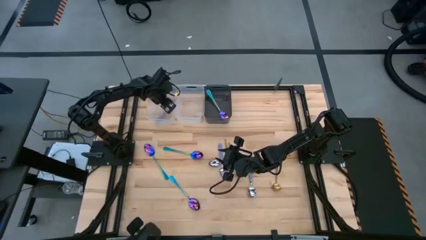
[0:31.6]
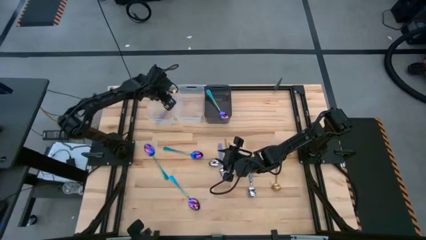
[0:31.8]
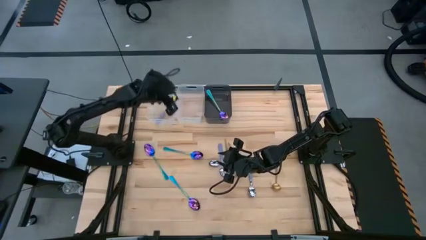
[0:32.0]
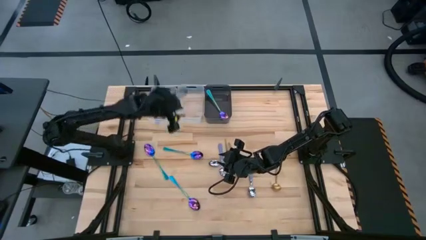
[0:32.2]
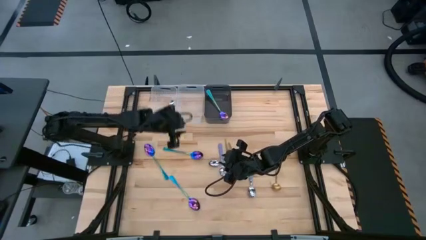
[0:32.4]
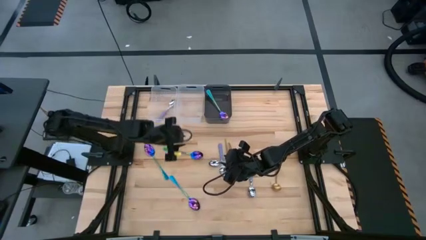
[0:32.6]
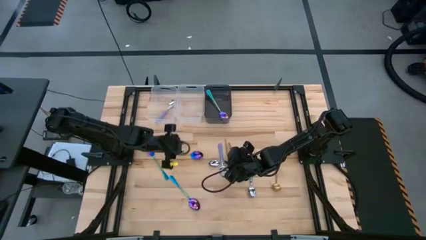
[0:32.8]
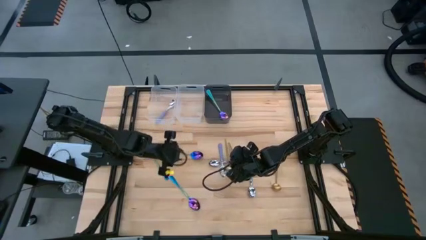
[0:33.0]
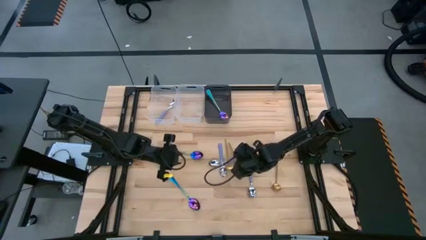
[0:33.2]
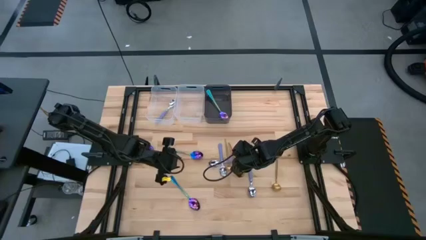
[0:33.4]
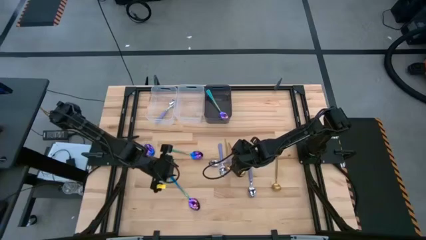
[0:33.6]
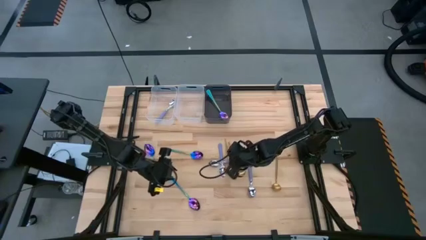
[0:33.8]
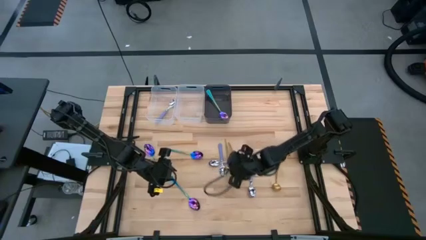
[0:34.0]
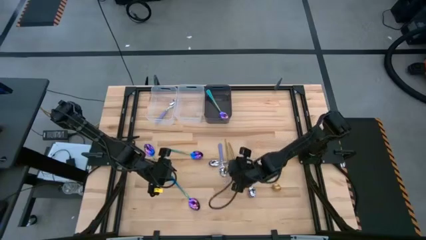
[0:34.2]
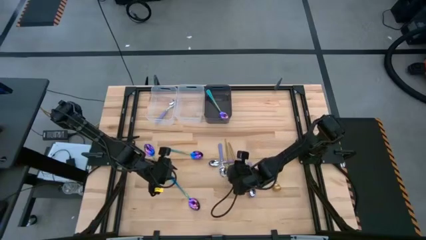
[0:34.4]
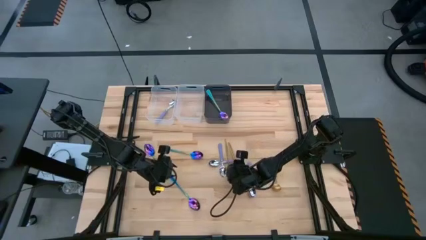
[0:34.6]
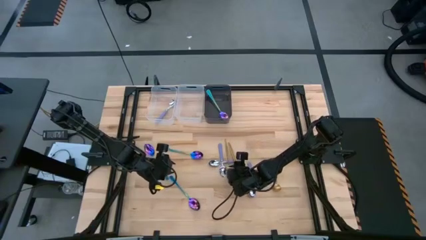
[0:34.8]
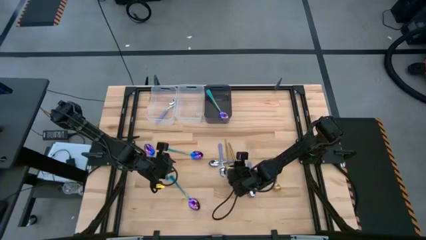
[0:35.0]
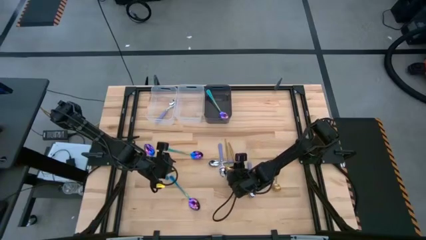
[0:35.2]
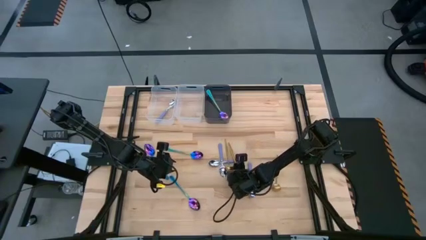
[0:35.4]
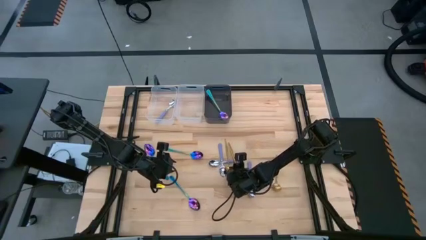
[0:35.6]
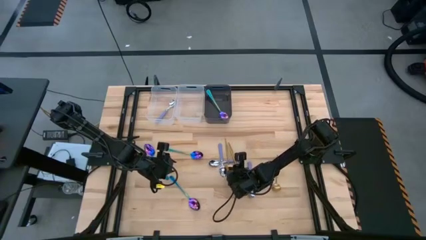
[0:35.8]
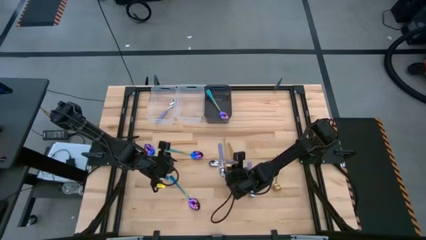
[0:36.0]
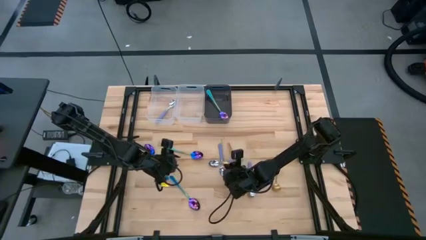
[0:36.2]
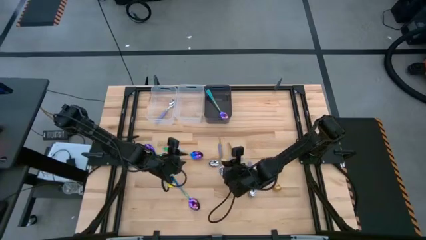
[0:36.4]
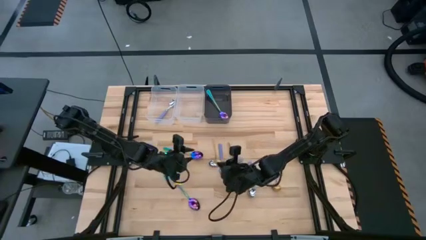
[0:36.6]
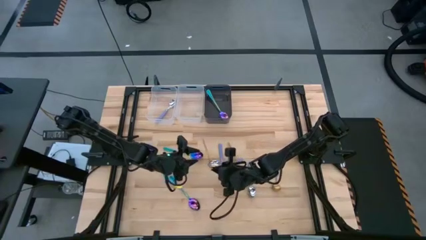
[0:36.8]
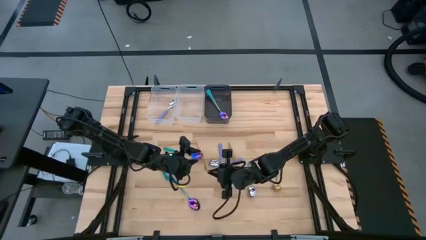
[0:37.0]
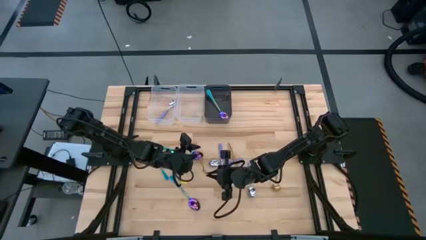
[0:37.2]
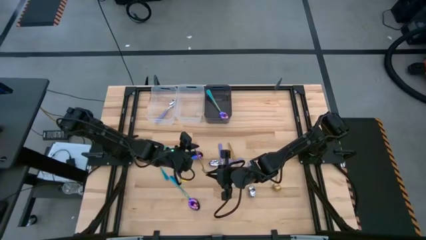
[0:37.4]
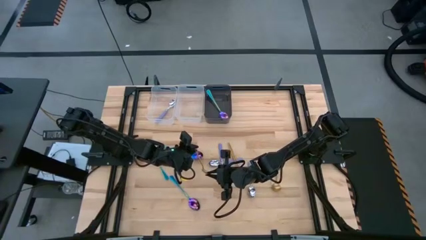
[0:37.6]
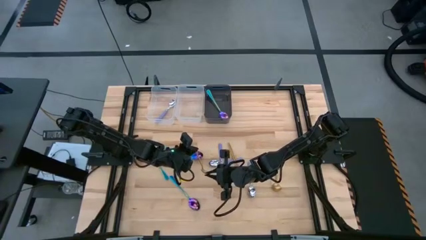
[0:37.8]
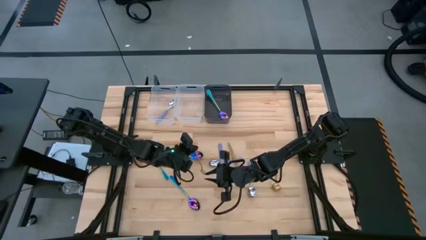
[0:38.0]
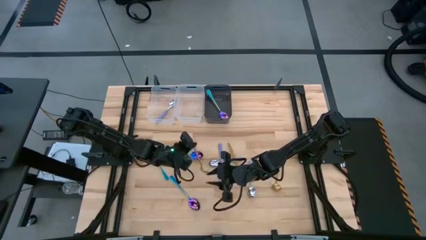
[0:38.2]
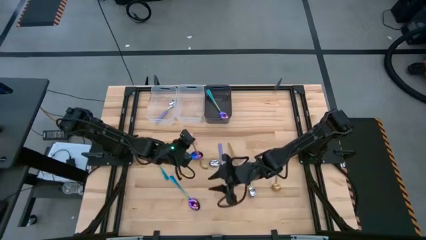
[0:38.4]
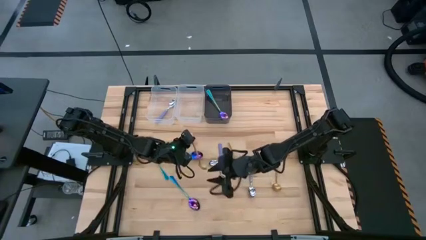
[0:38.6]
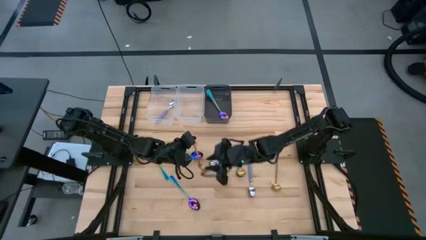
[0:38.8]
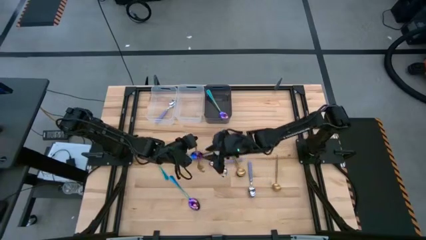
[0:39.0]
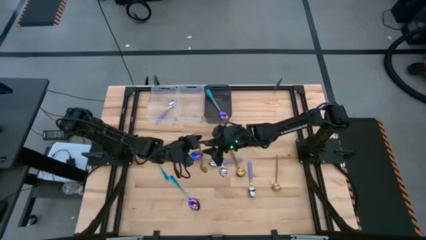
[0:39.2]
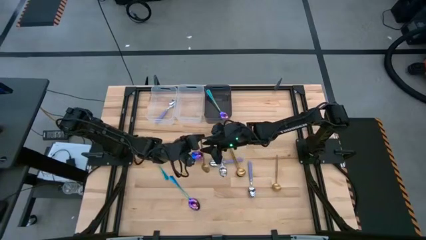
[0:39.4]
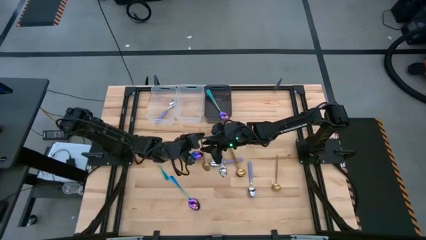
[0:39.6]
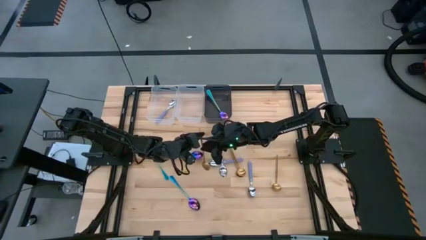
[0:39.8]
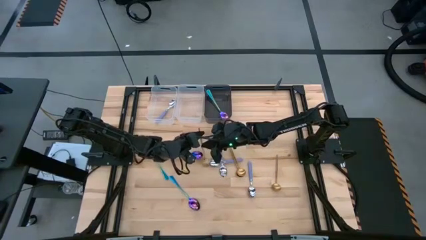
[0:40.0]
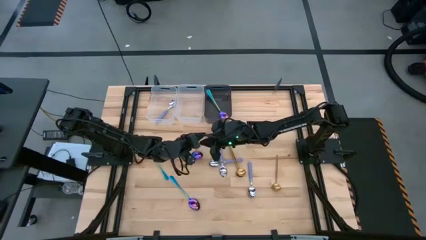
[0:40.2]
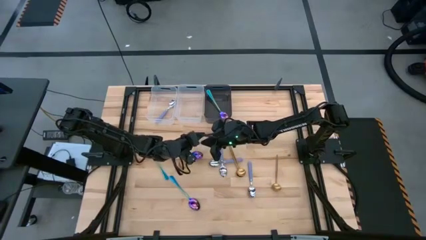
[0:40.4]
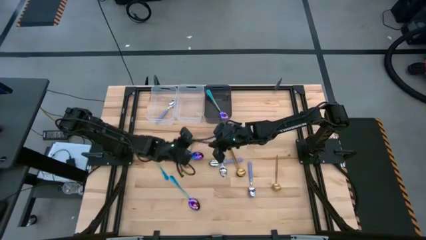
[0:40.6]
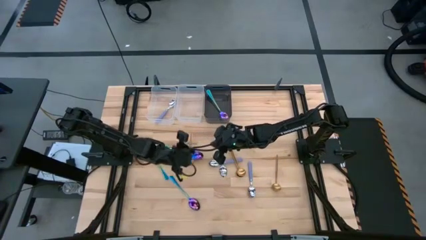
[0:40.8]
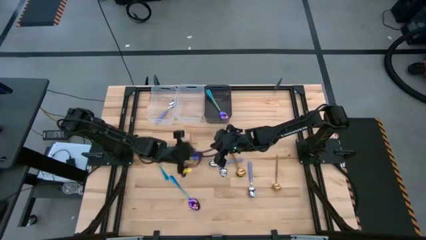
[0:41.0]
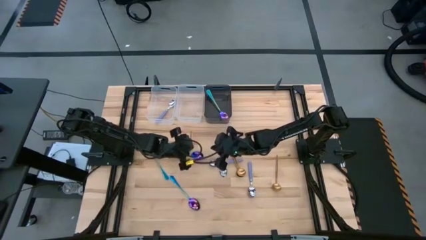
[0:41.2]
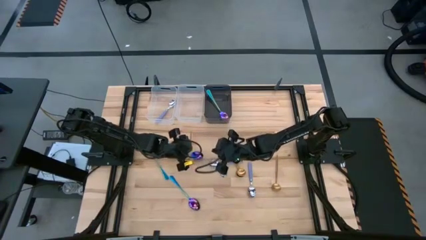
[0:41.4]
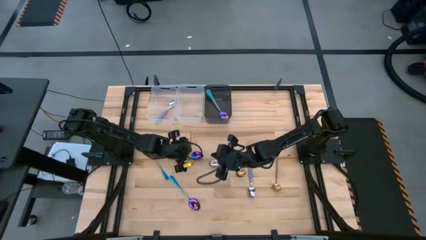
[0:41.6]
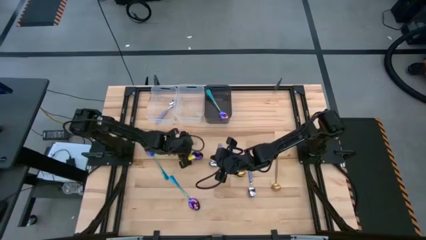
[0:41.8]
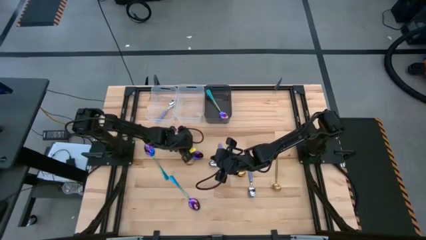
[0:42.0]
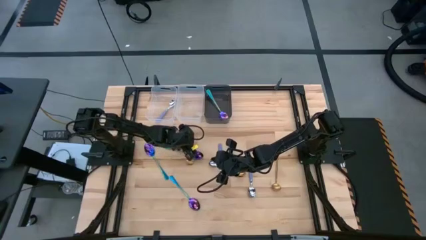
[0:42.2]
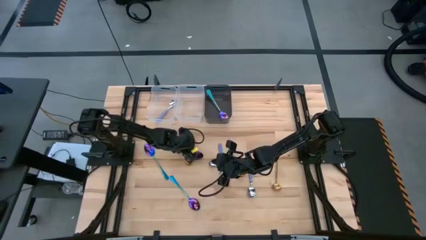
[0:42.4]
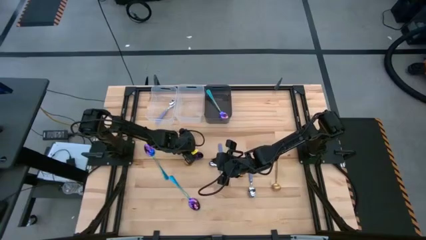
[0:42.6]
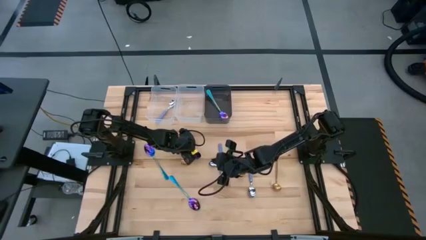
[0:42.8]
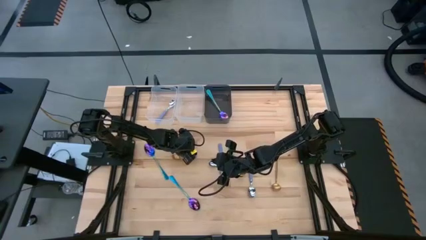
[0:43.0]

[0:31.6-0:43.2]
Task: Sort silverware by color (type)
Put the gold spoon into the right transparent bin

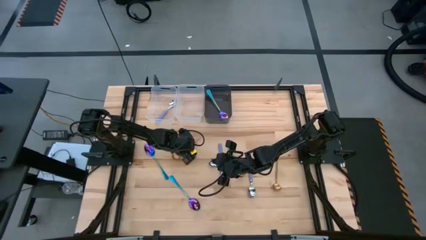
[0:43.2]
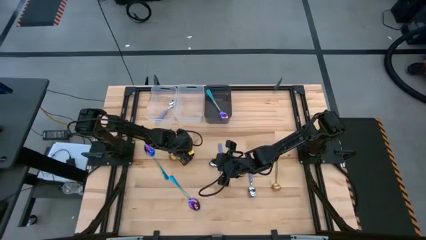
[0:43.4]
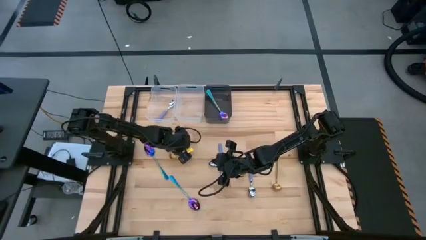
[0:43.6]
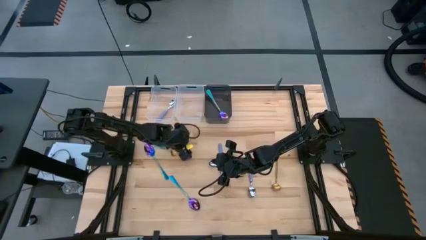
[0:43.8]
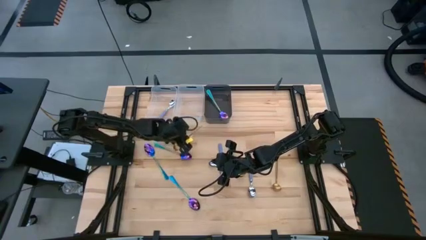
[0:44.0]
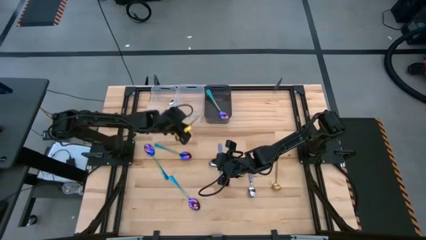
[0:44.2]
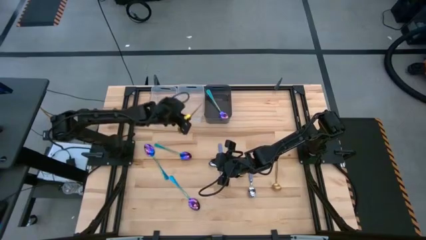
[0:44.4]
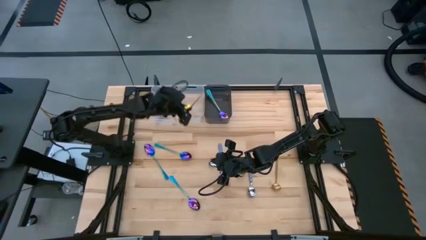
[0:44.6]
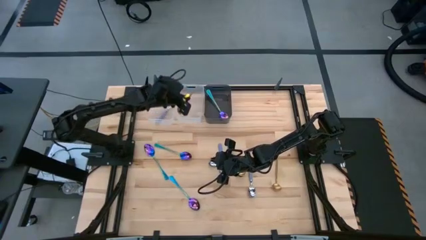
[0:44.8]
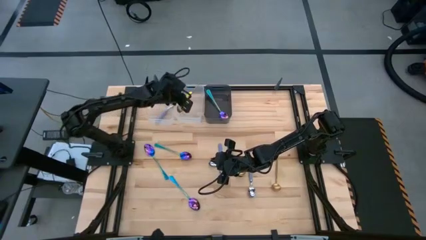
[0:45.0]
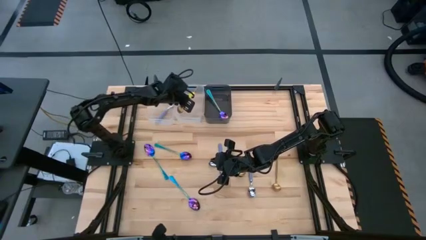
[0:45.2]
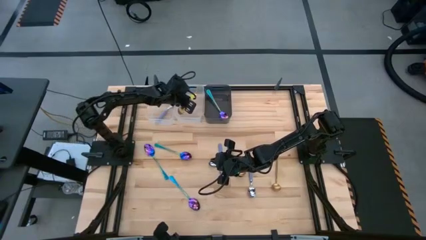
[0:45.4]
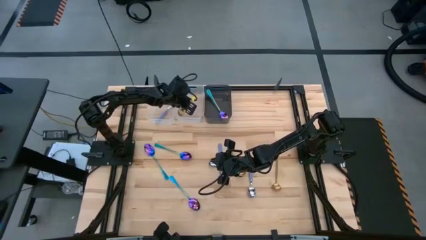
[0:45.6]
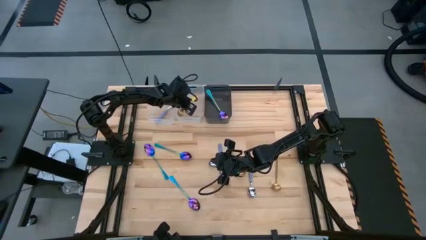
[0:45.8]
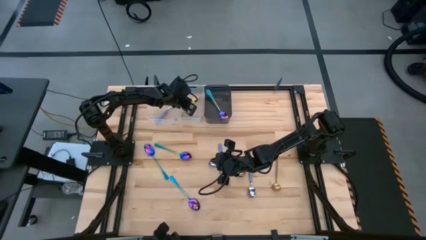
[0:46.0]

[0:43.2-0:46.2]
Put the gold spoon into the right transparent bin

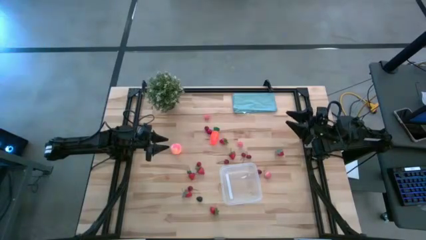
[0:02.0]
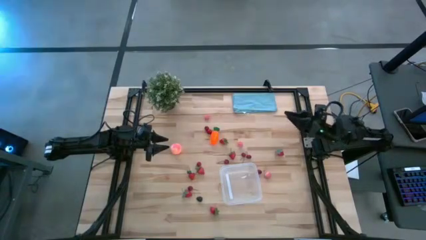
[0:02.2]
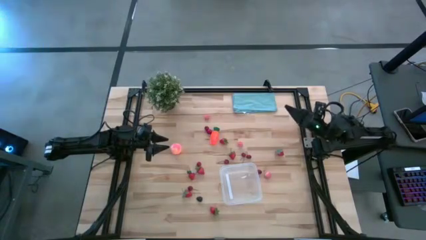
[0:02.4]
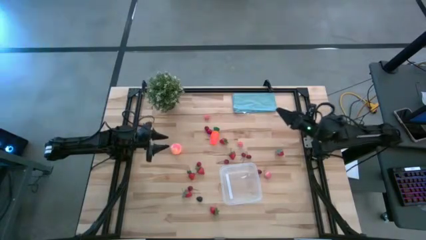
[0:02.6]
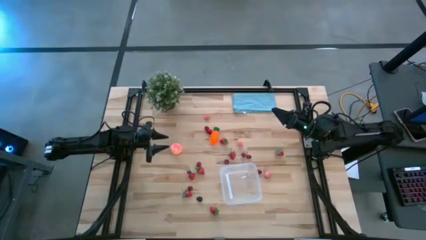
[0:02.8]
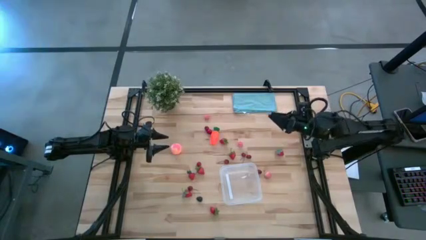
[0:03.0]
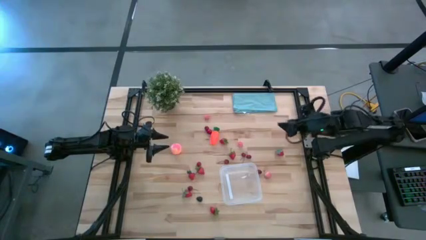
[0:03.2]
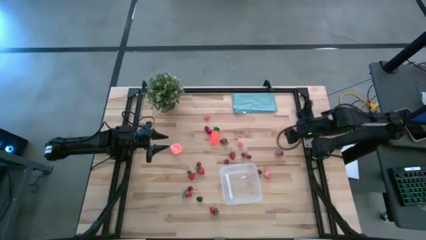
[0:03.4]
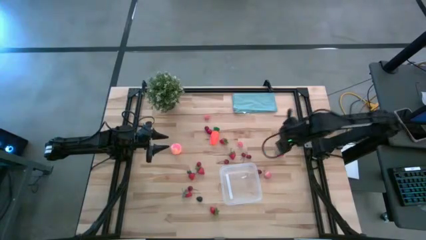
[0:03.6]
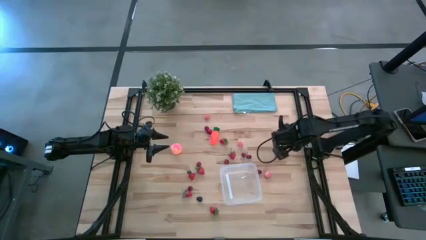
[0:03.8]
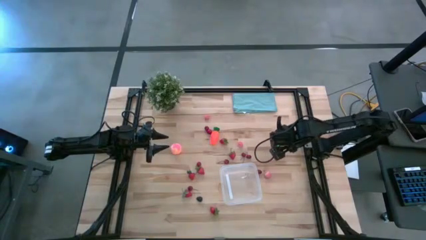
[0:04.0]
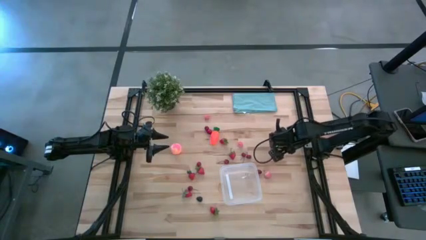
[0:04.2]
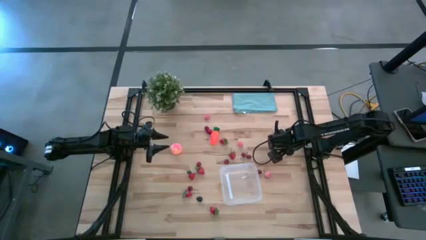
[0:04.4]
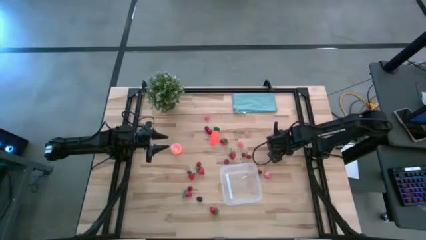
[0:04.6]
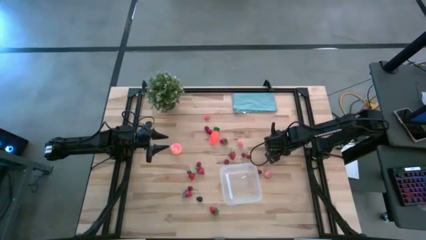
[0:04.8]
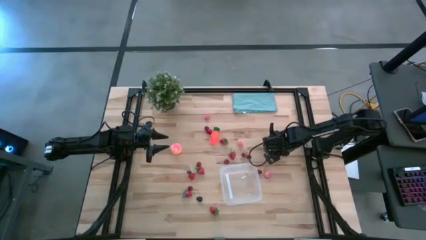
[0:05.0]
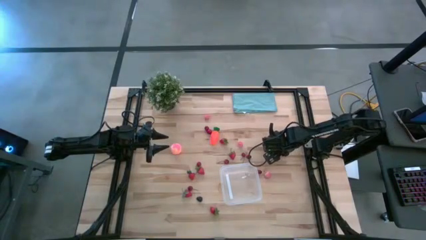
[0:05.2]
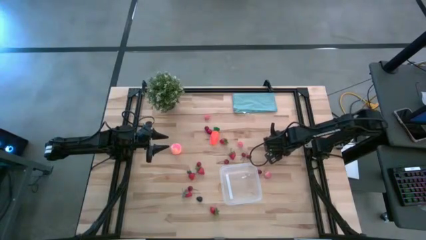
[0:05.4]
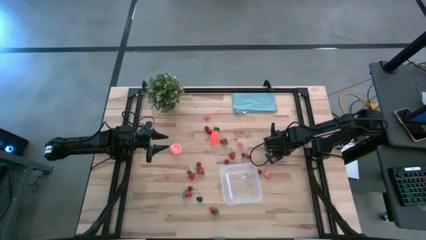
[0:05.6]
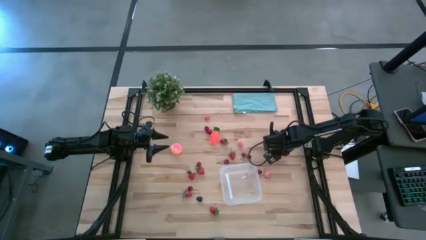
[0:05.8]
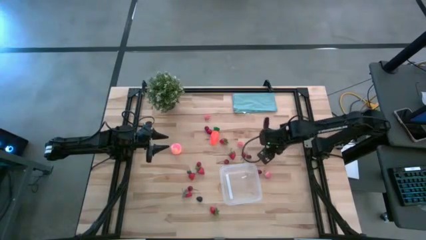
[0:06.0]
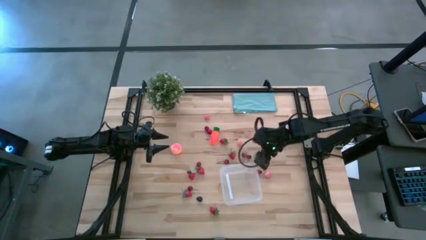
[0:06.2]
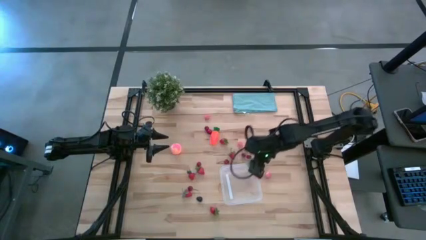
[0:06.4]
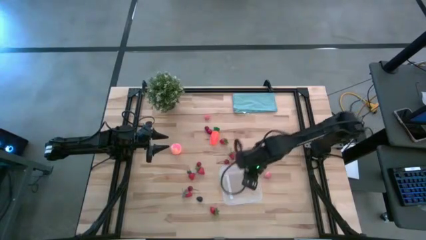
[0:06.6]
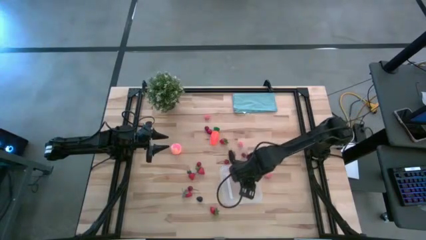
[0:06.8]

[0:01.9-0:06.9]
Task: Pick and placing Produce into tupperware
Put the red strawberry into the transparent container
